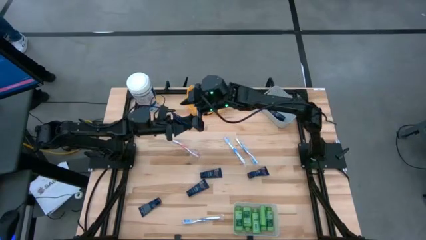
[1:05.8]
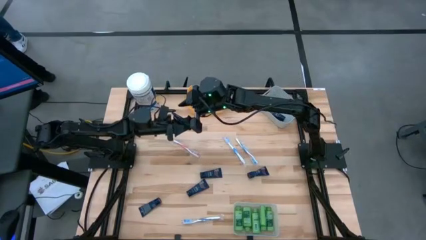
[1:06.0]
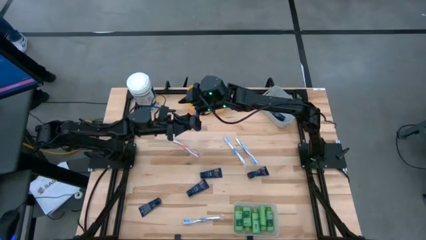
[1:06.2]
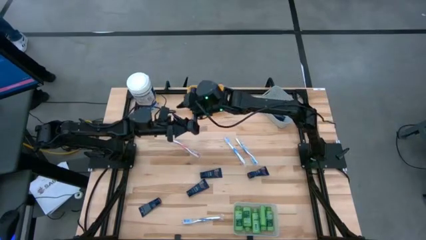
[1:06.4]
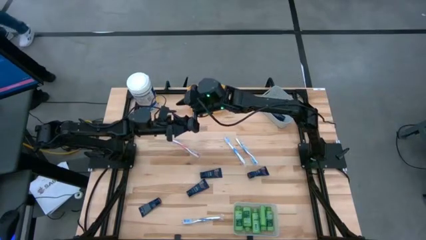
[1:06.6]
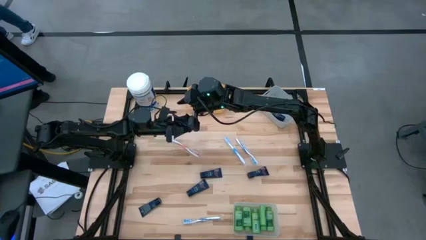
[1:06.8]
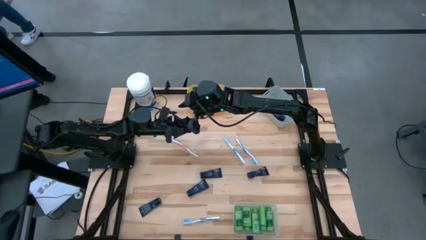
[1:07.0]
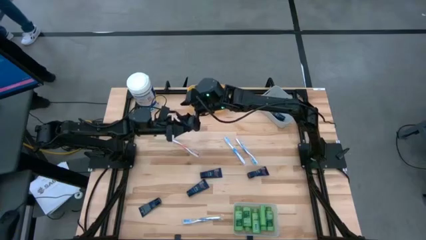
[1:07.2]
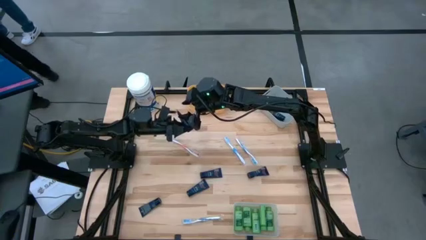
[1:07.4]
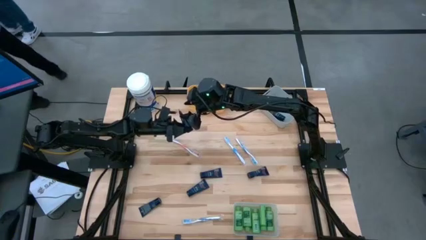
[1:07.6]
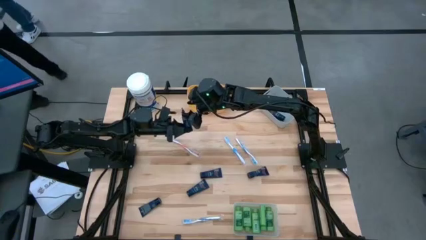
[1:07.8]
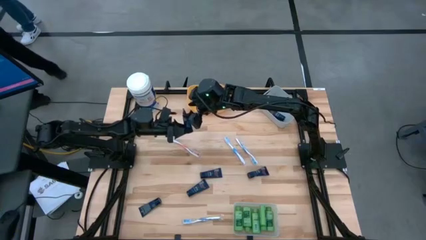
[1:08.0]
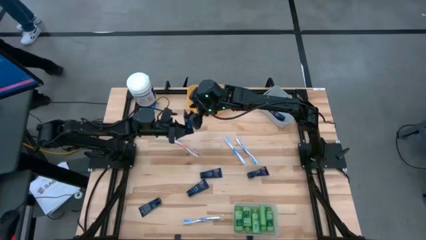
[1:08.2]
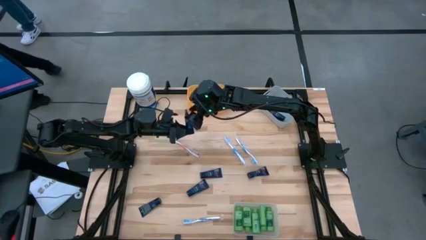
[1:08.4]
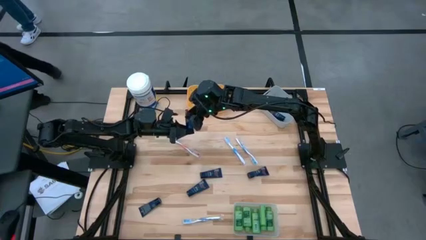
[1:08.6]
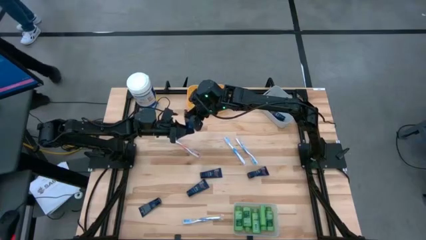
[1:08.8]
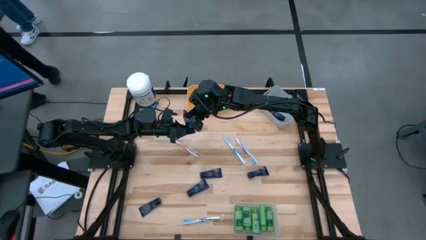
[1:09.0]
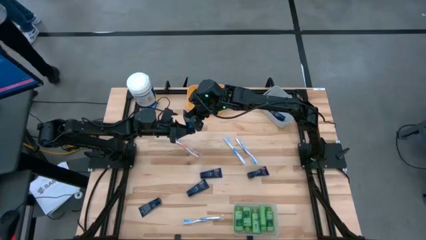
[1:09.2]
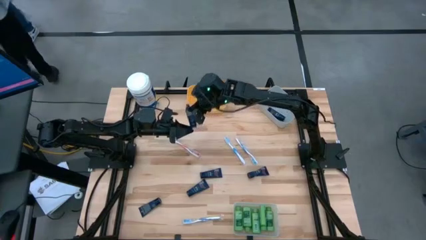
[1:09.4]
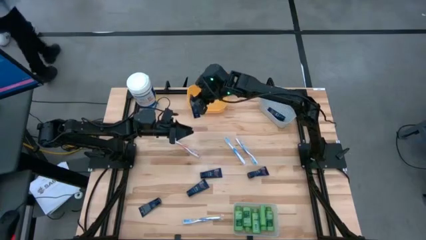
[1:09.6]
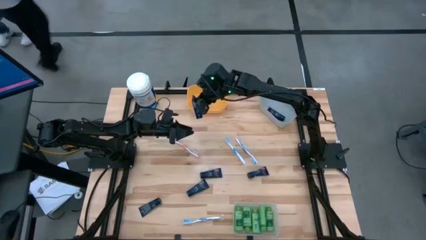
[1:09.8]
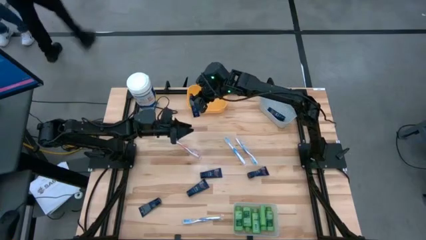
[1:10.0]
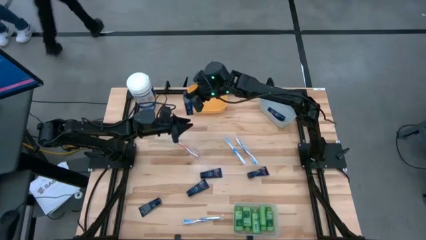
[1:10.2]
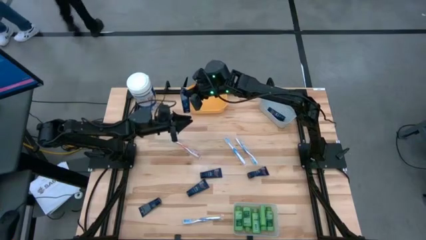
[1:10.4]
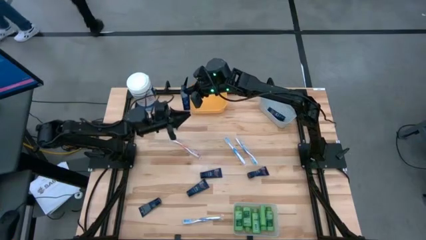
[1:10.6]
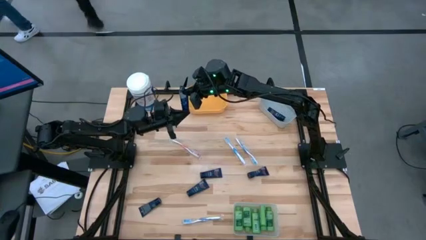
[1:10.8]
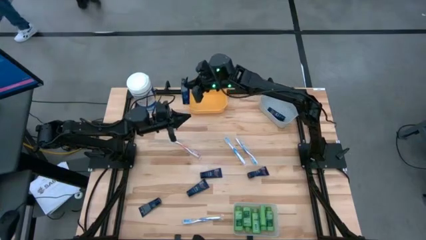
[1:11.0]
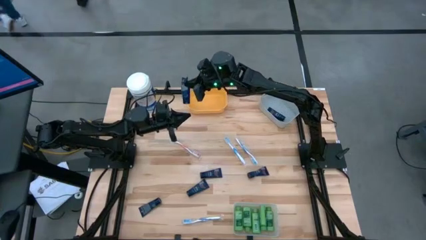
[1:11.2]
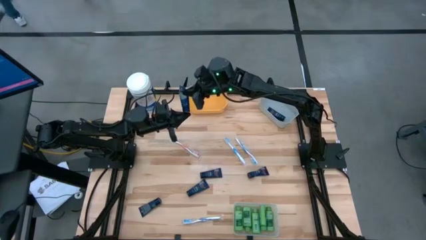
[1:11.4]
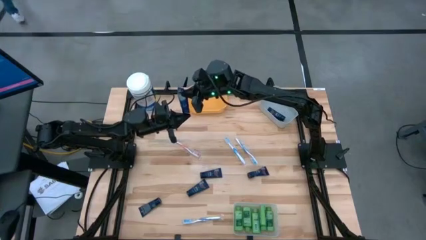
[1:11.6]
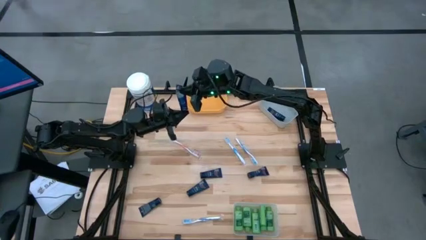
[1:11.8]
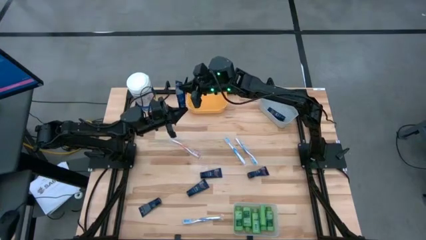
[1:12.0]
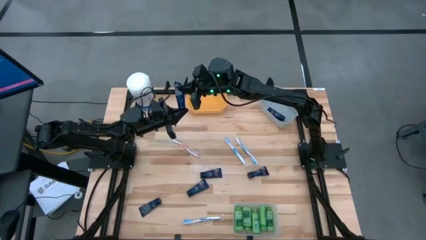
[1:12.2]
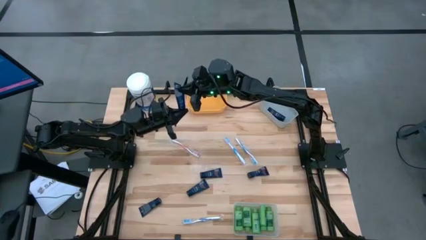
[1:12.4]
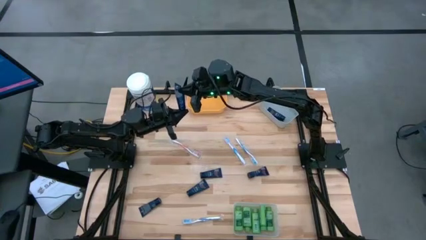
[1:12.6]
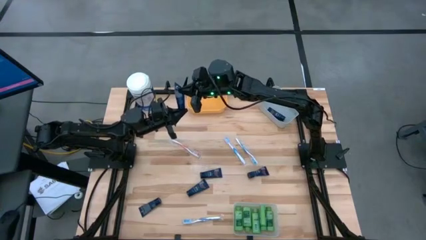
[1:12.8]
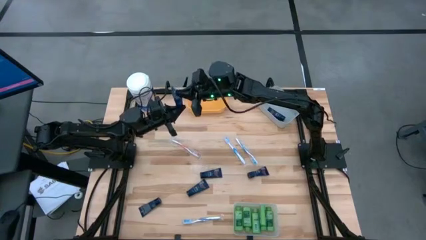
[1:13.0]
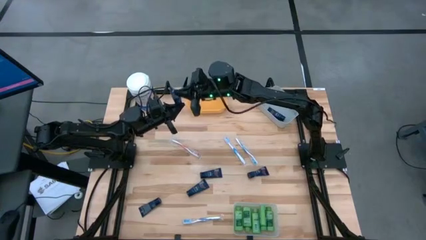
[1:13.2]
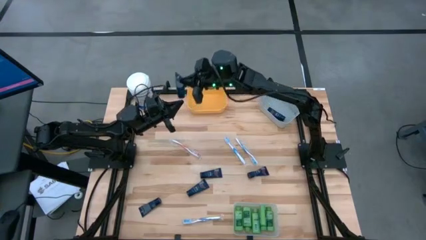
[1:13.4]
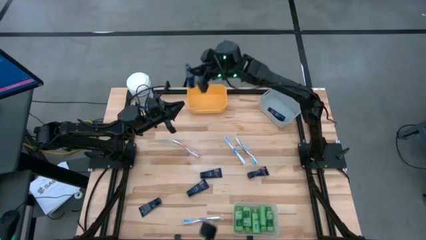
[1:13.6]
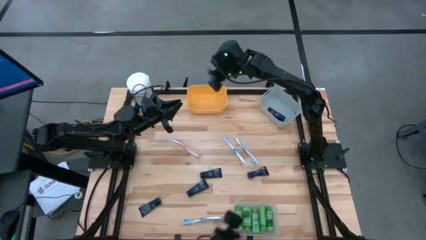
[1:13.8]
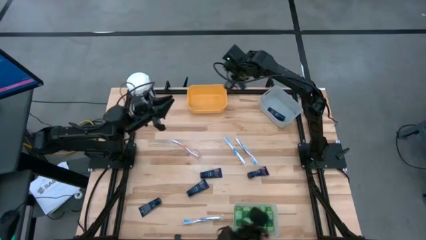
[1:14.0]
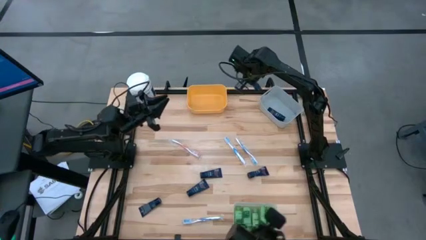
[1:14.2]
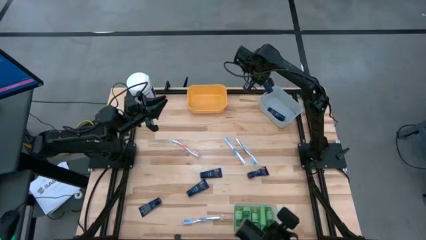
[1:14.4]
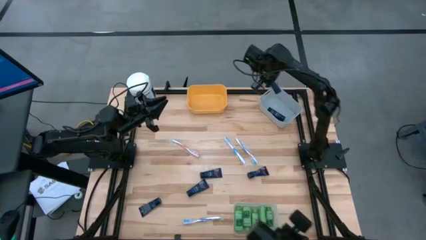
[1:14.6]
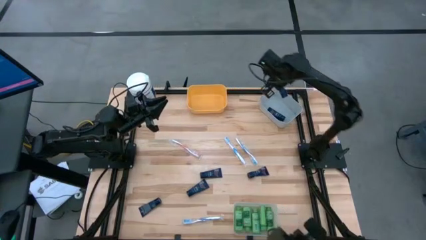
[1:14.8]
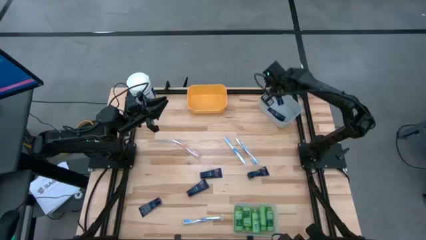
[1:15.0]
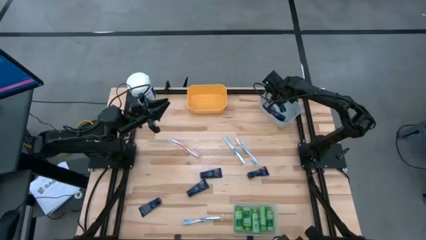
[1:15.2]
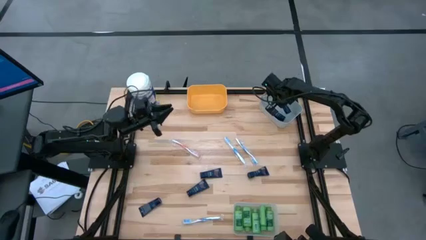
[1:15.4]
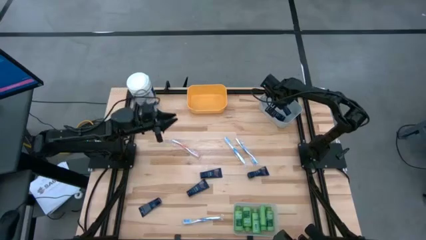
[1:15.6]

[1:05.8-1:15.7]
Task: Pick & Place Travel size toiletries
Put the blue shaving cream into the grey bin

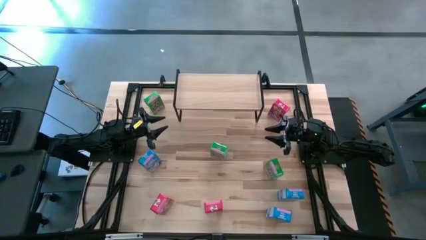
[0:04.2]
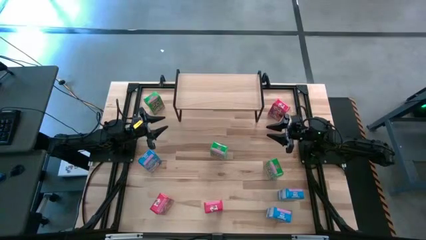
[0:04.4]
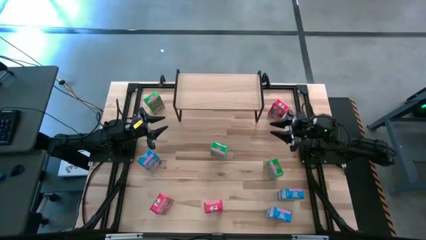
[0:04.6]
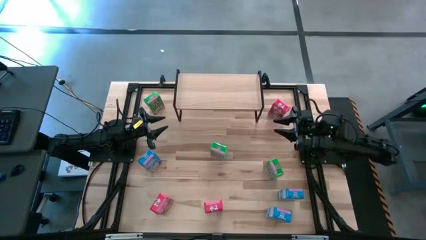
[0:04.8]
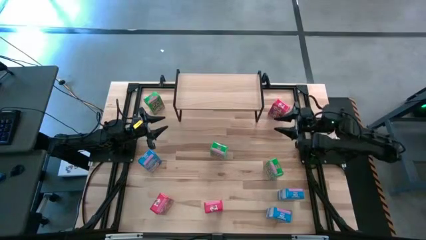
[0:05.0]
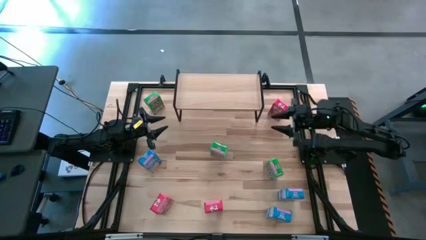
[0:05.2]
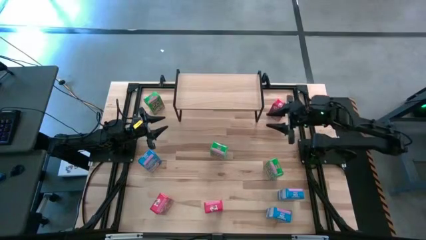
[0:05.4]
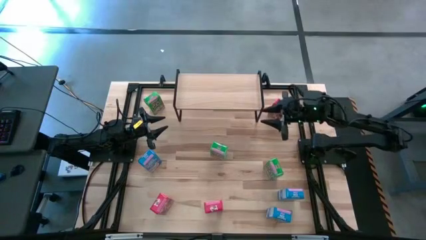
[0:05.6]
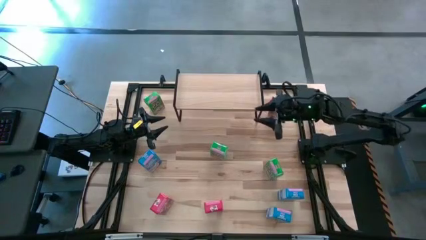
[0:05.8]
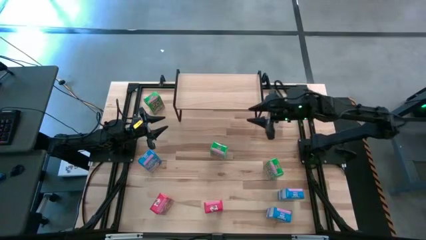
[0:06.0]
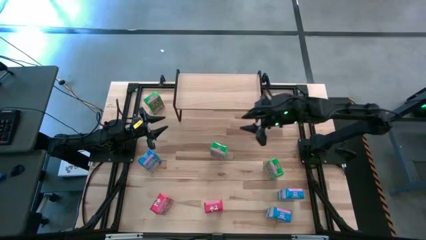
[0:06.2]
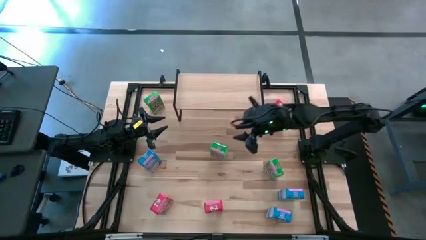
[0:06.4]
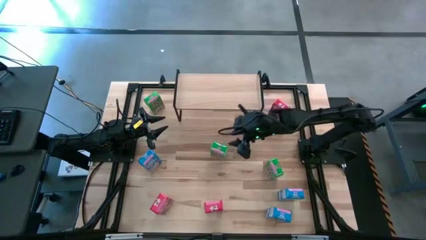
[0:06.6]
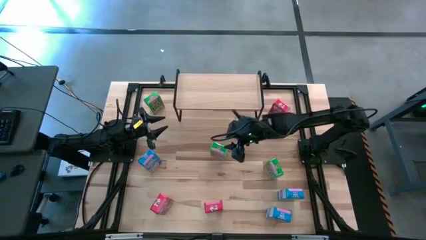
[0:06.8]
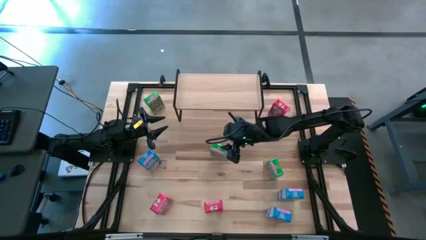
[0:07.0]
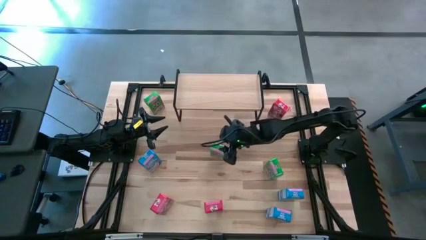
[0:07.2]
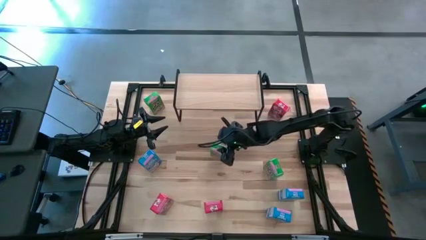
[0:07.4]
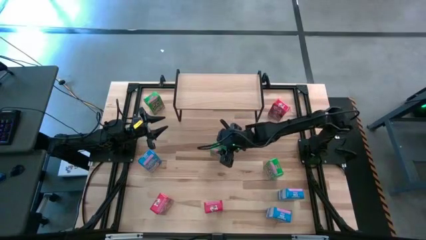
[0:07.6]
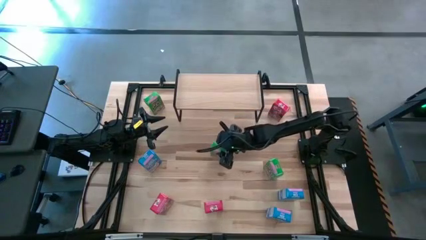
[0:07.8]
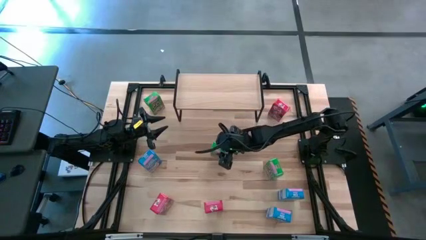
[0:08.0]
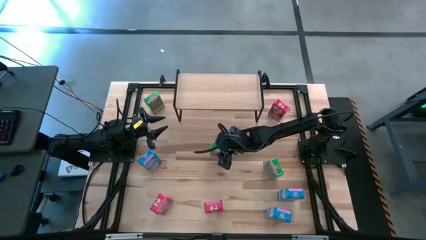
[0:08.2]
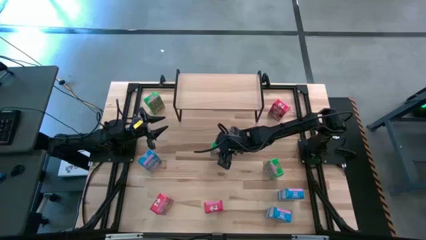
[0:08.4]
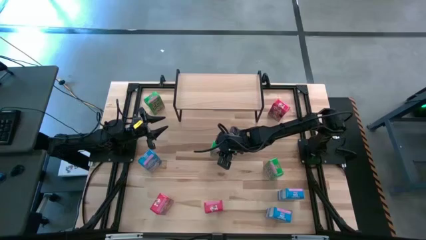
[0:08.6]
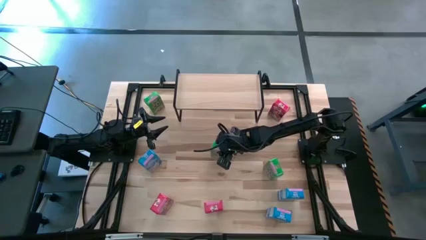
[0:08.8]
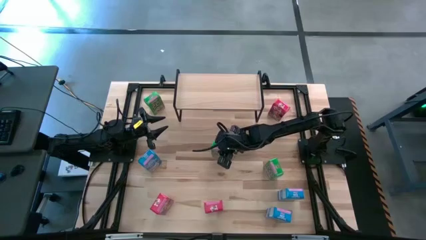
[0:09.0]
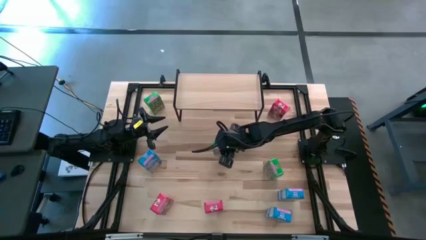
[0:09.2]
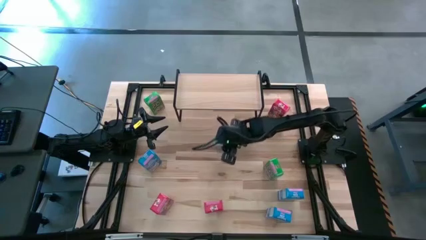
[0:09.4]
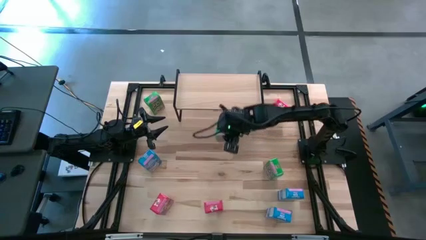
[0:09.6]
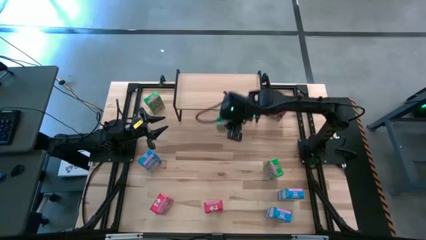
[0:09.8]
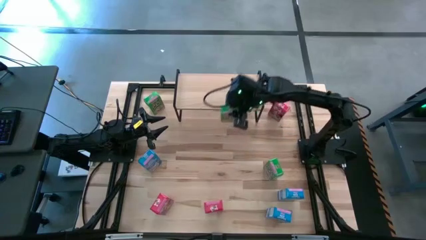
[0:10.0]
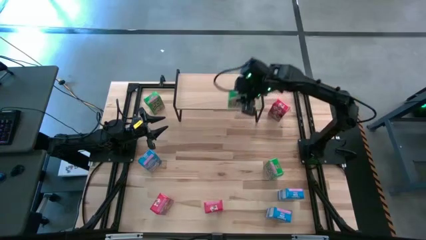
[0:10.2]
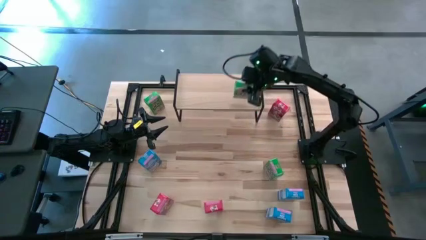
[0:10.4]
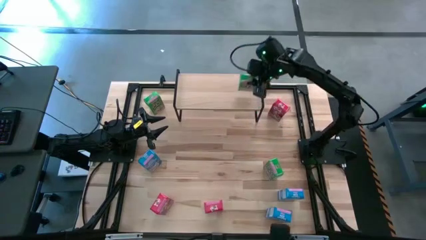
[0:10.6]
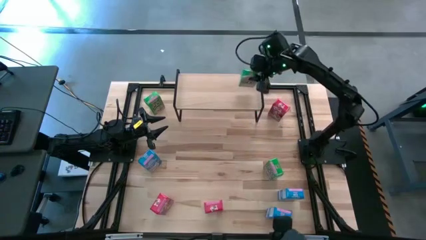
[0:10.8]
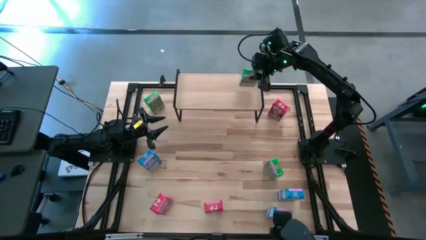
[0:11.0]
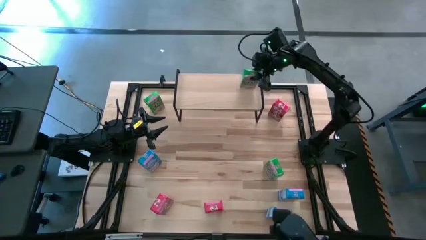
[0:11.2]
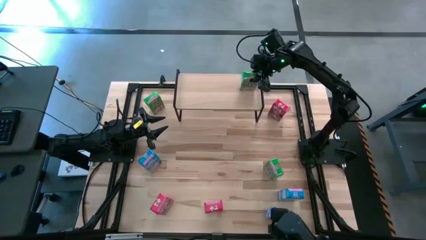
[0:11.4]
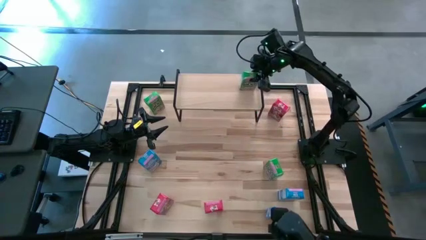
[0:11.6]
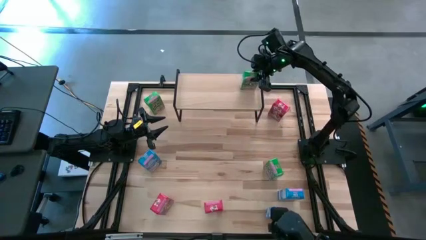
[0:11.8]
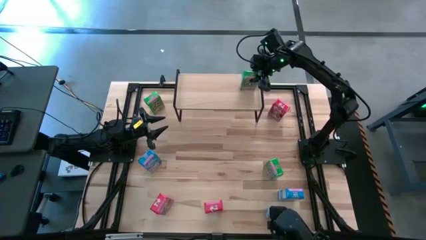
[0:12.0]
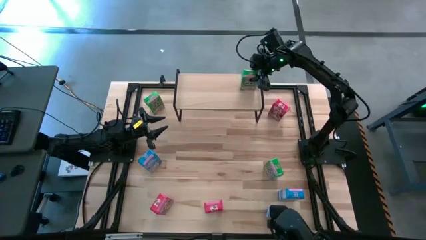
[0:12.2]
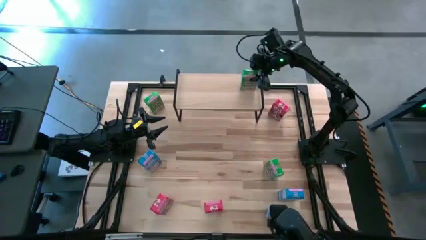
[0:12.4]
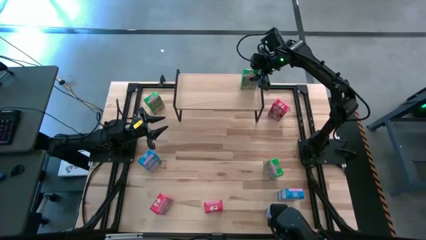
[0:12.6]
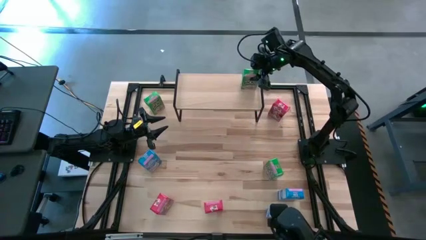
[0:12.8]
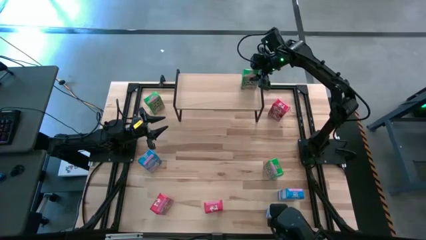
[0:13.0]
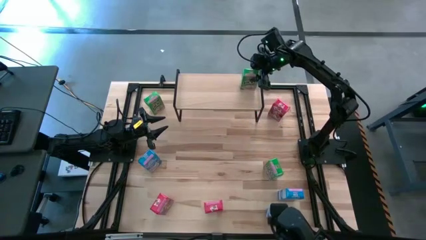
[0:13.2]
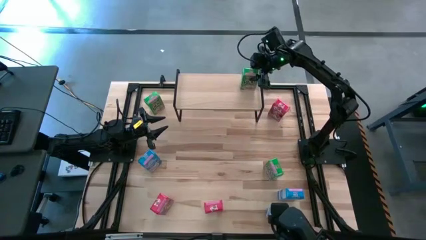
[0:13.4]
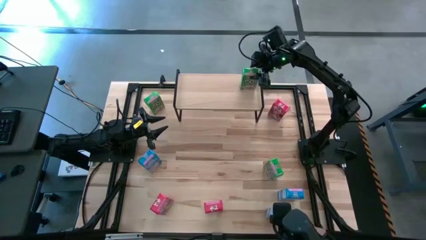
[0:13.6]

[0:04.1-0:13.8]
Task: Stack cereal on shelf
Put the middle green cereal box on the shelf
